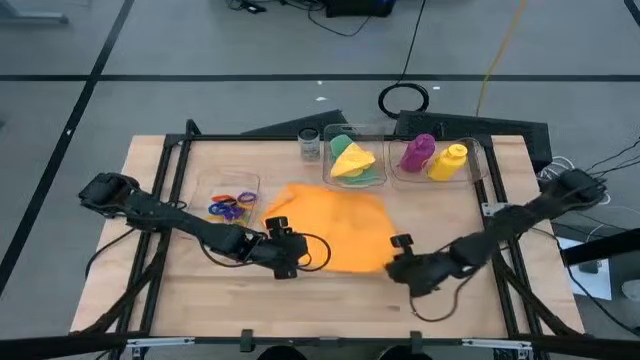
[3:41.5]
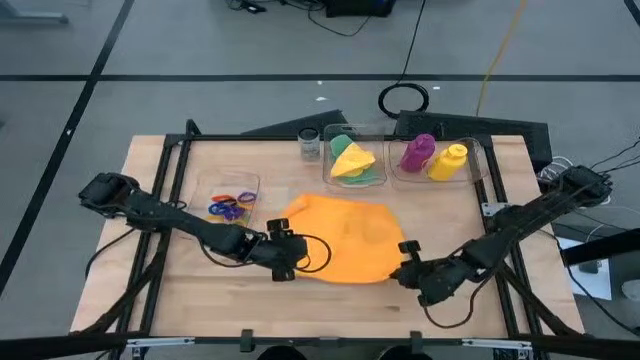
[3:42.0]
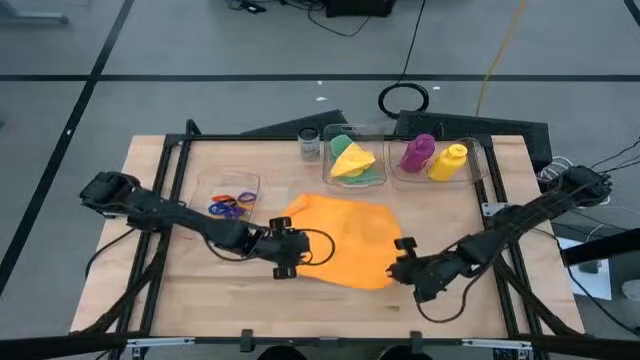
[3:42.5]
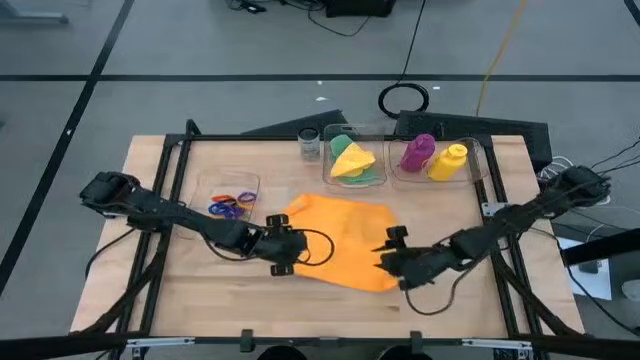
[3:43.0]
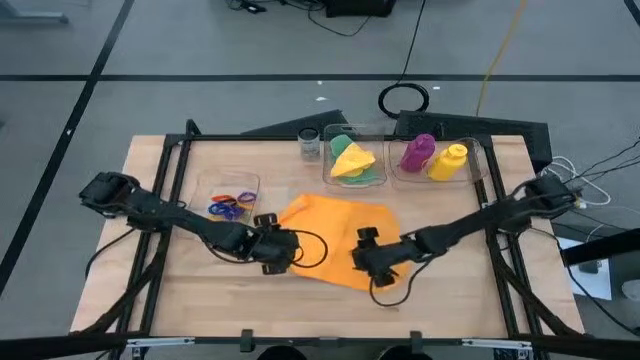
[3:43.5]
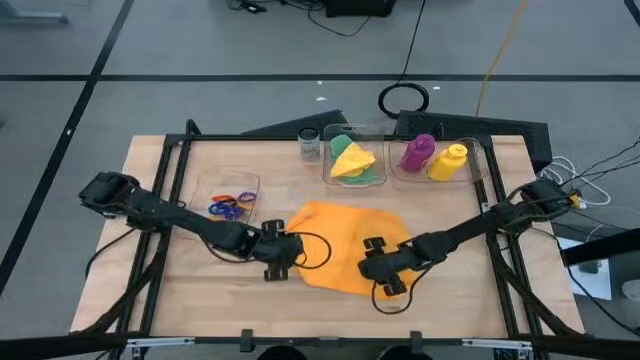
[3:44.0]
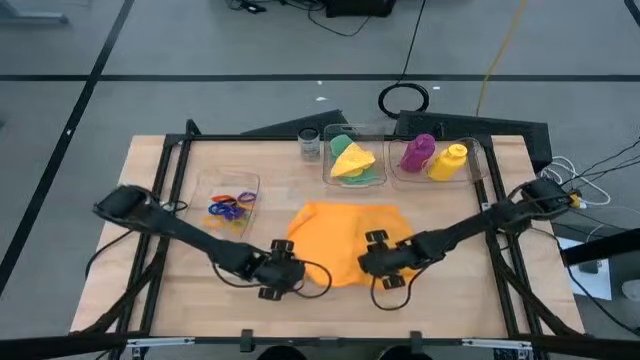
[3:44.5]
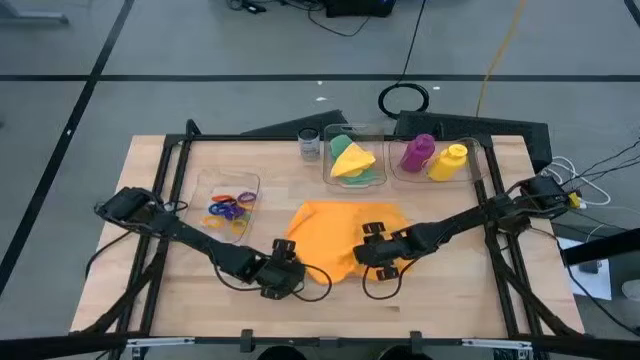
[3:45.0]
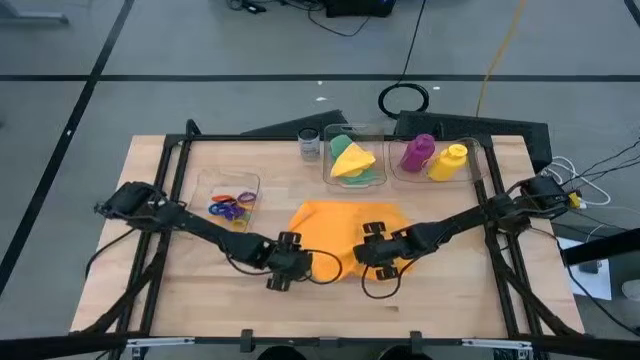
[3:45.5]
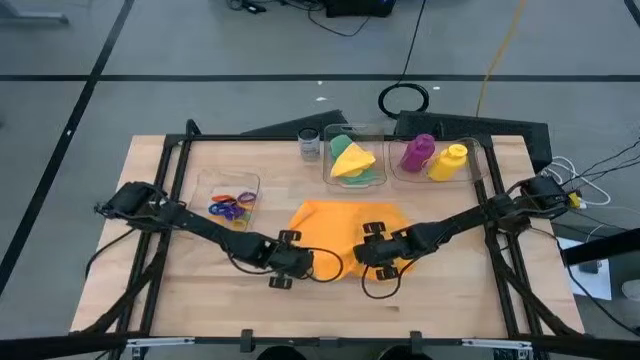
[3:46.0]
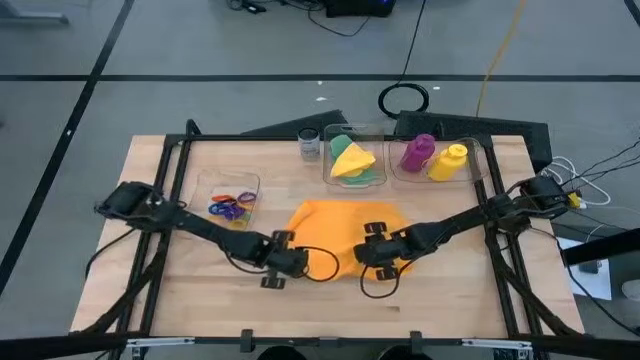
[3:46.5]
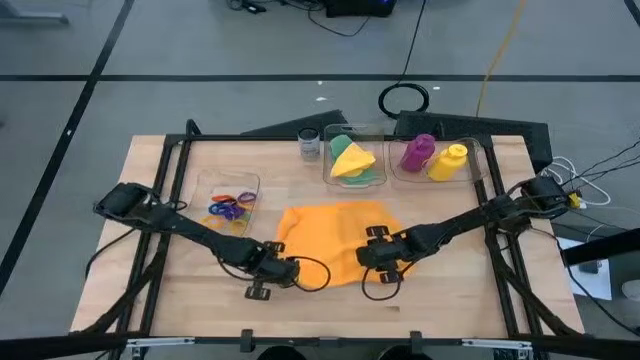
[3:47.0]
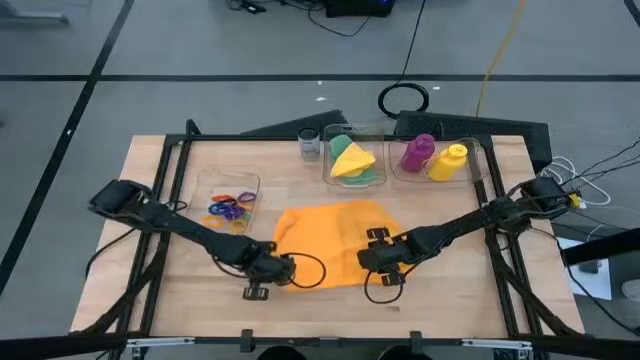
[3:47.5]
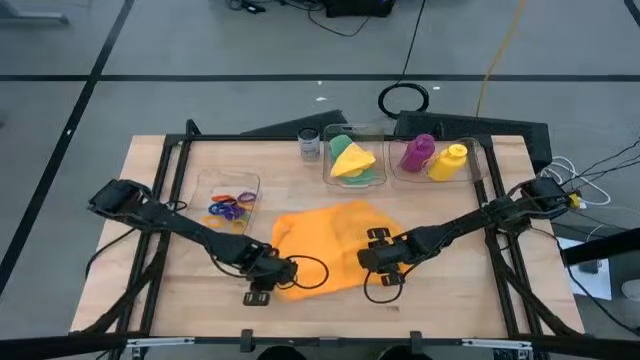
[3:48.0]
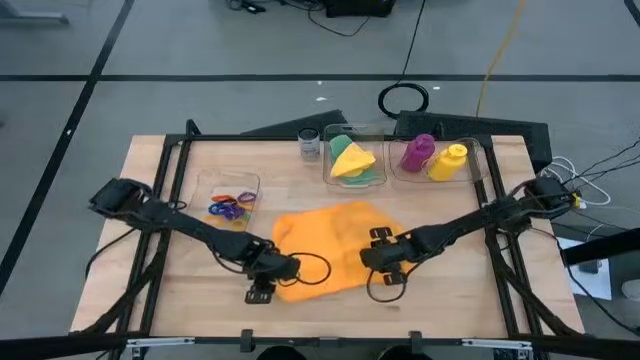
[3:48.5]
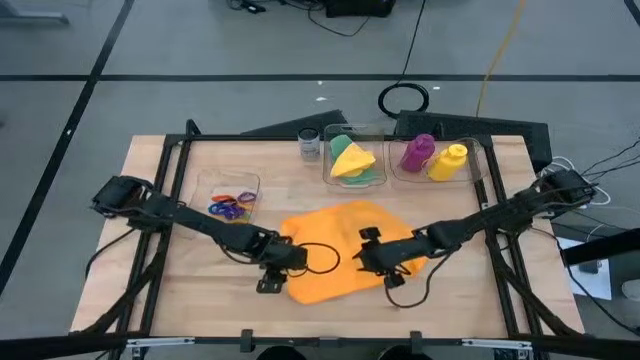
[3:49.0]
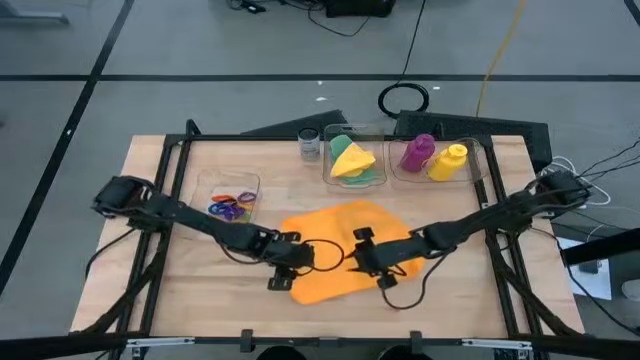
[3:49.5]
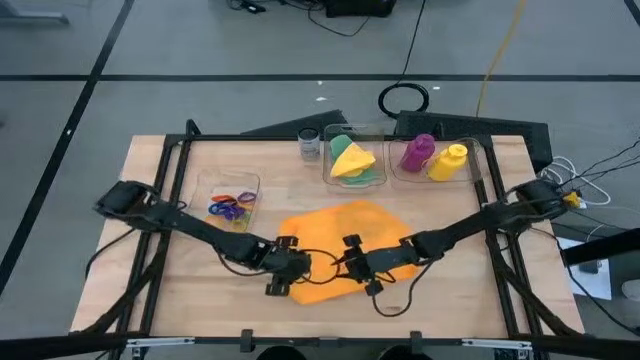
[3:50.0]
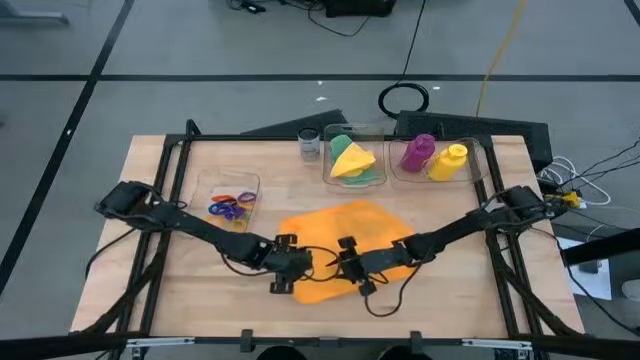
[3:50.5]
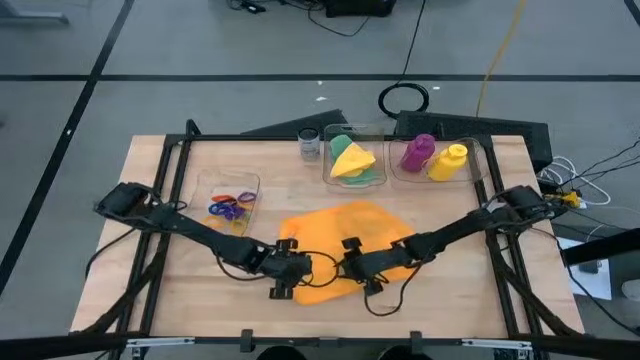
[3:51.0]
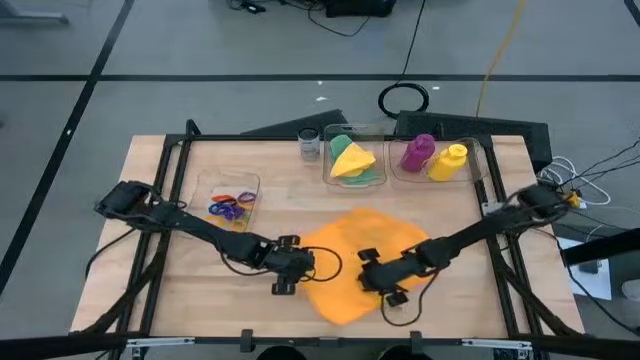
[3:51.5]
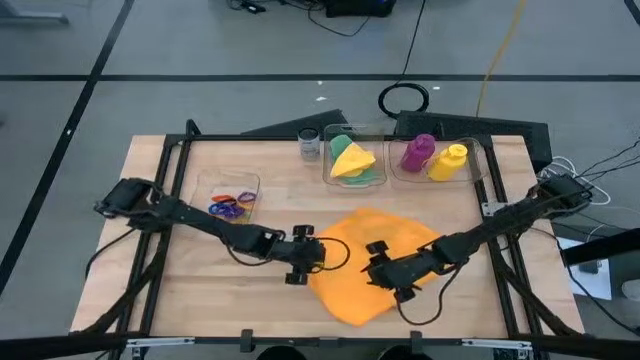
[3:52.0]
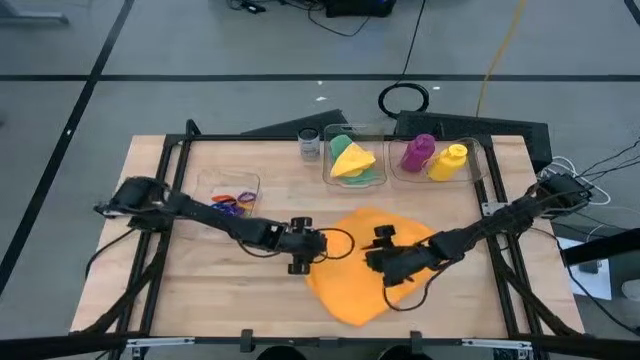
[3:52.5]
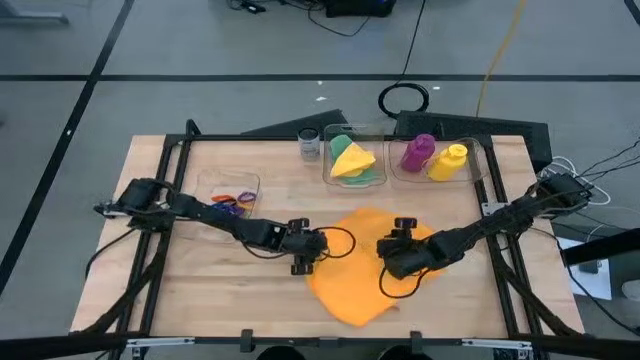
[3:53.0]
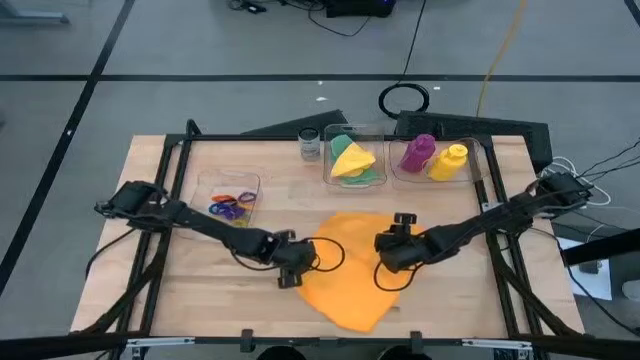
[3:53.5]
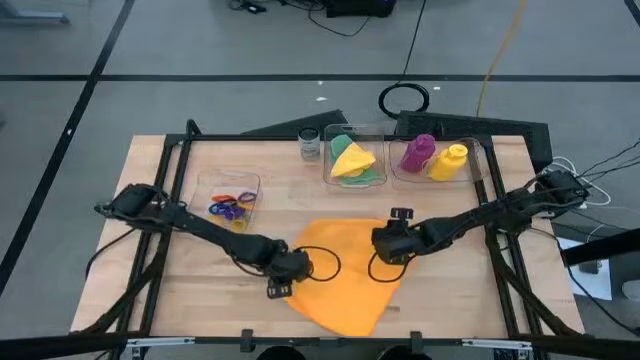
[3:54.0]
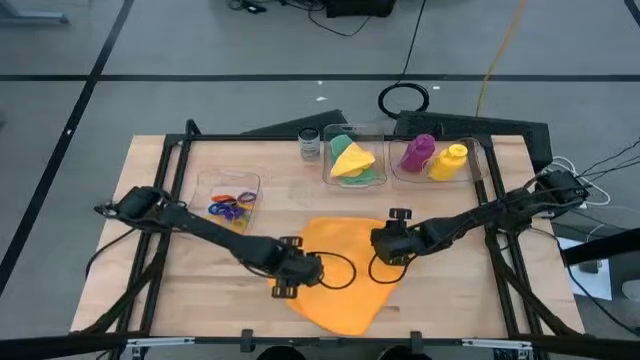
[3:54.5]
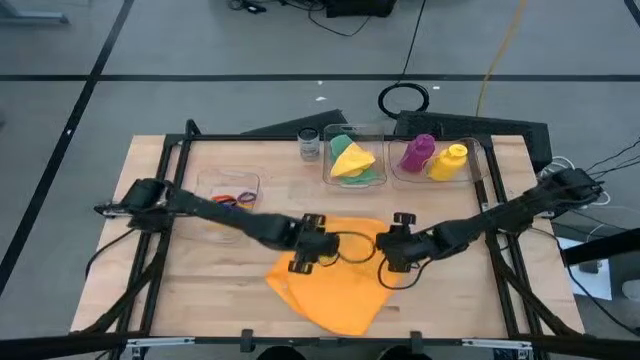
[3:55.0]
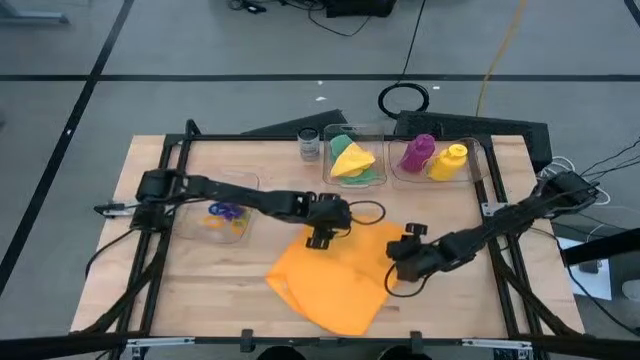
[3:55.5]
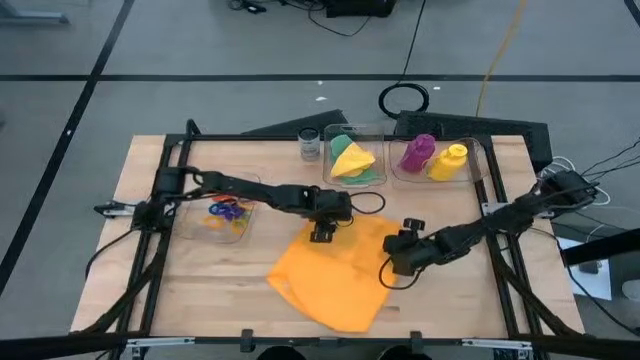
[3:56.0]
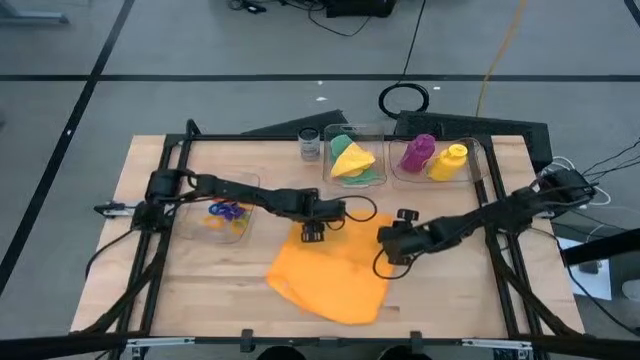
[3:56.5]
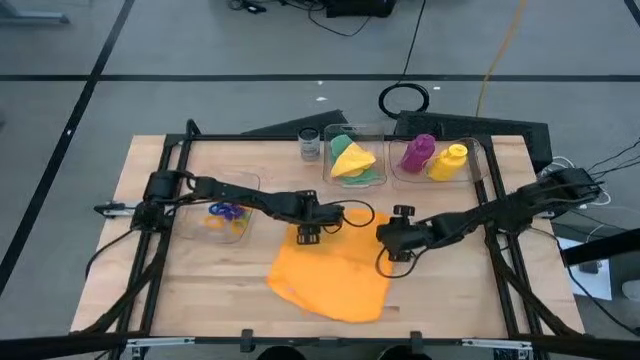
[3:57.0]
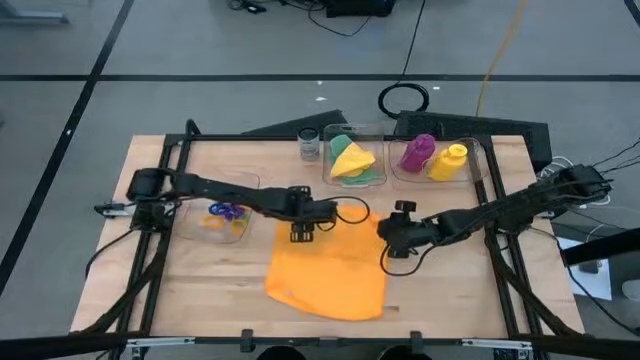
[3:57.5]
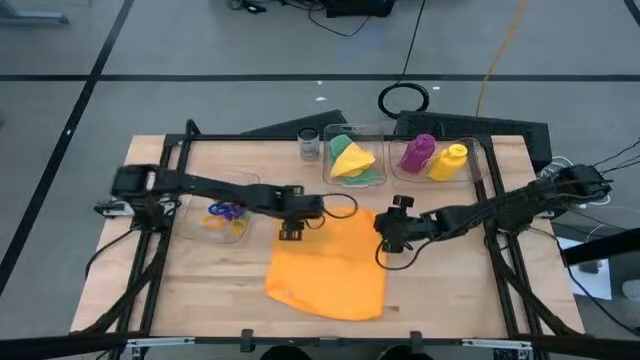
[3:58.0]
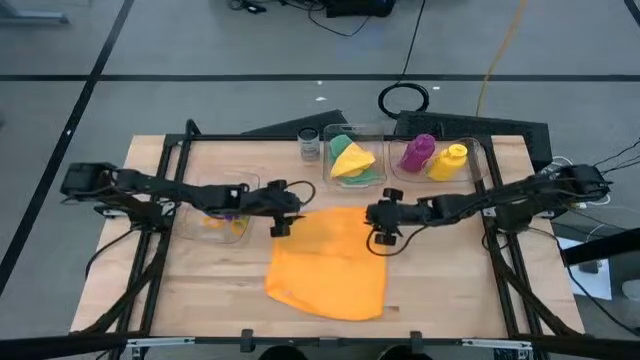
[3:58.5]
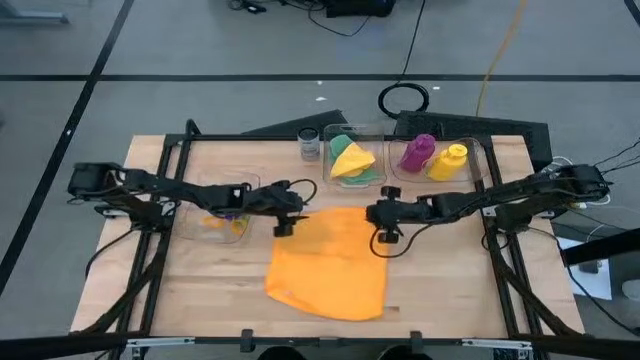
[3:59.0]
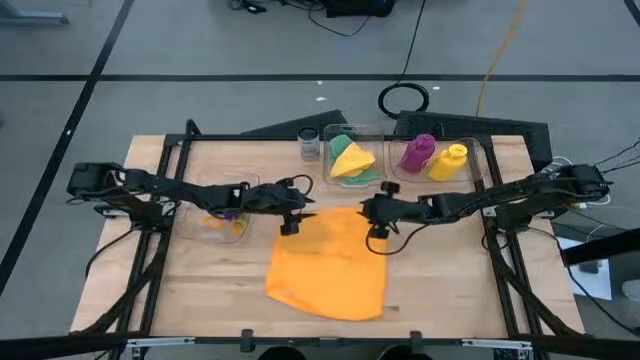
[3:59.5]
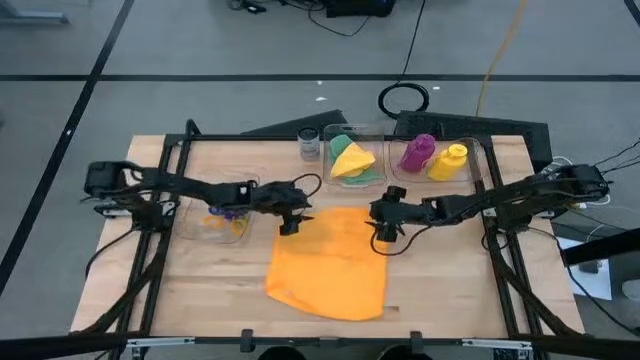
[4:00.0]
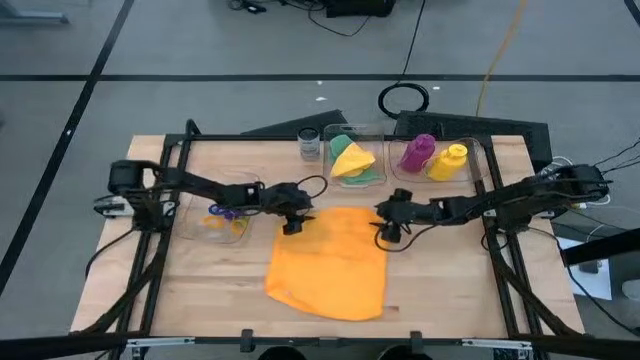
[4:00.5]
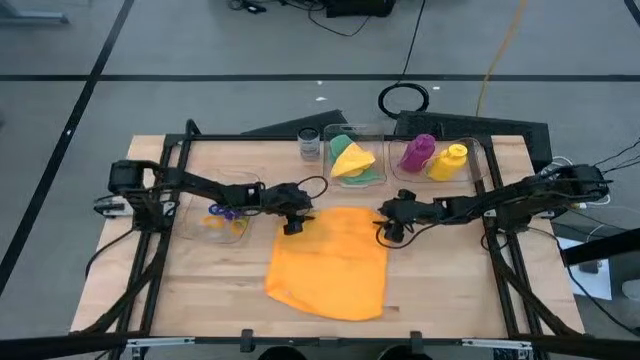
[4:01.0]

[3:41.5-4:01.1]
Task: Pick & Place Sports Items
Fold the orange towel
